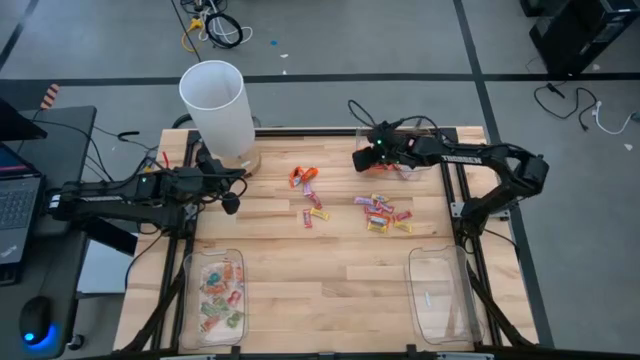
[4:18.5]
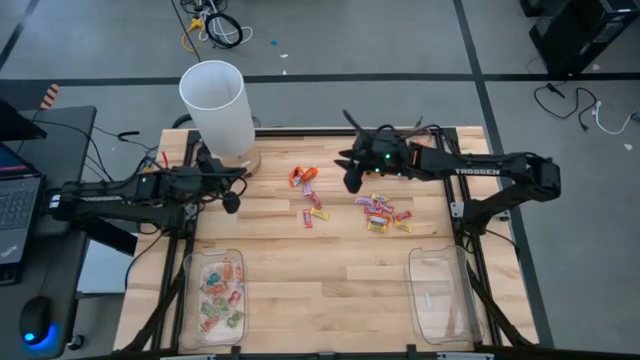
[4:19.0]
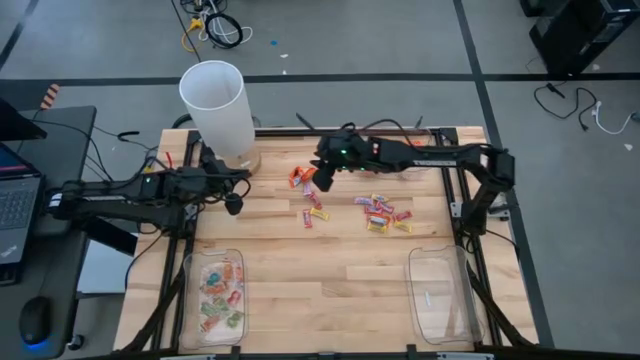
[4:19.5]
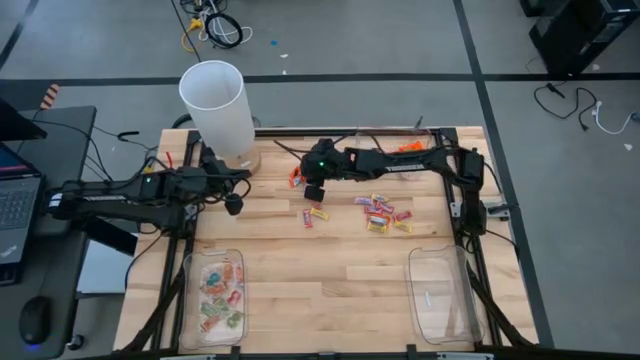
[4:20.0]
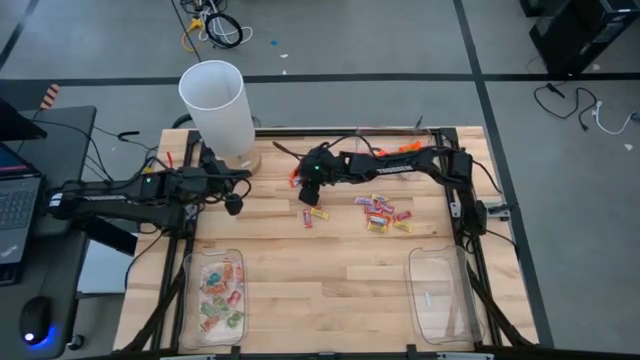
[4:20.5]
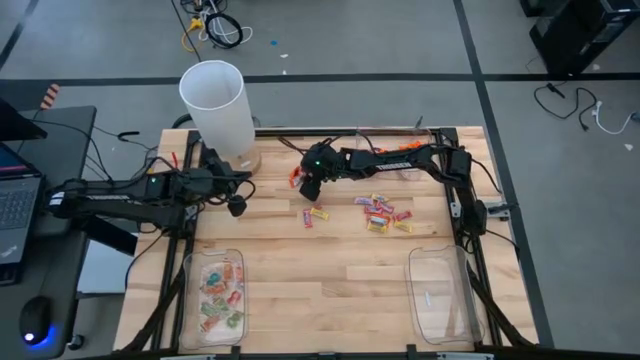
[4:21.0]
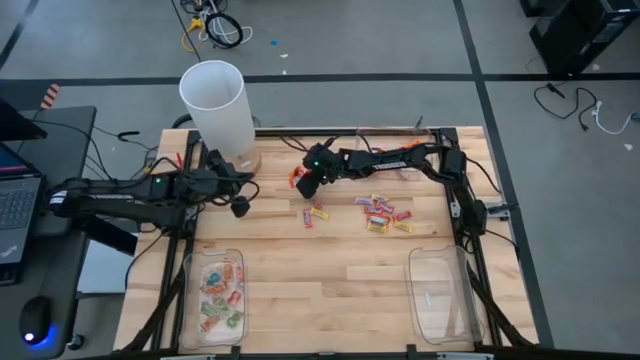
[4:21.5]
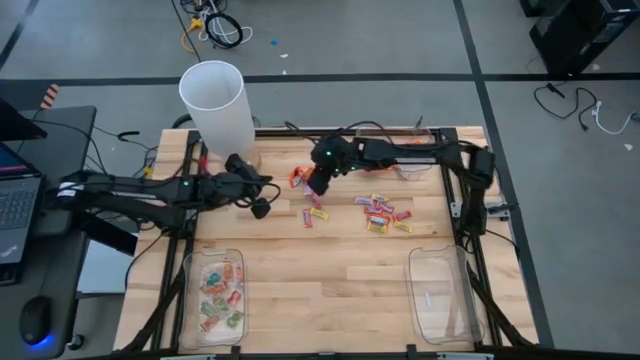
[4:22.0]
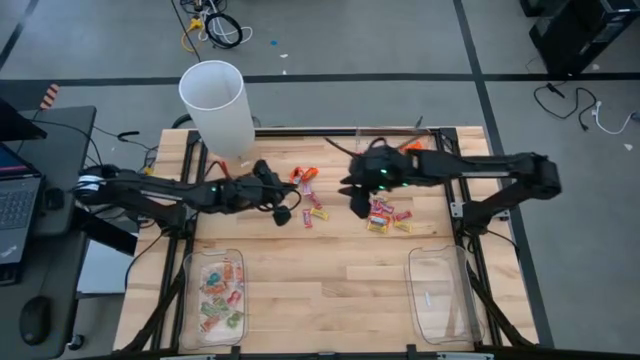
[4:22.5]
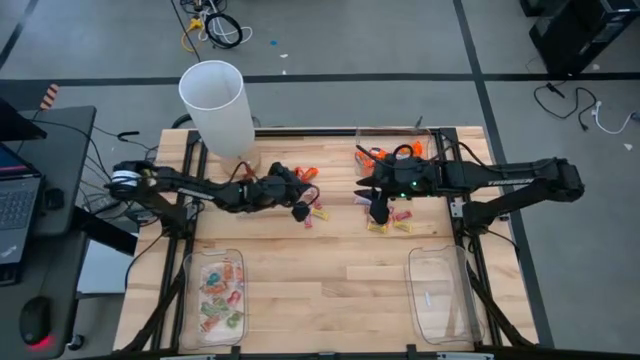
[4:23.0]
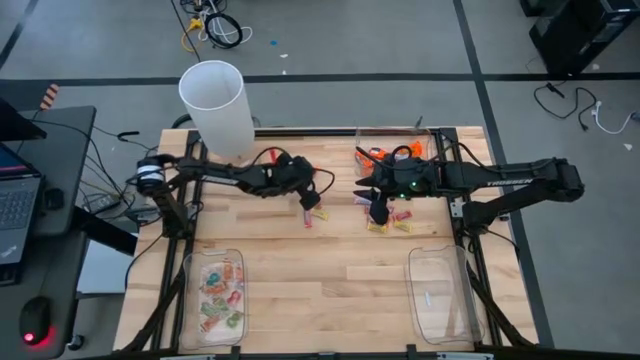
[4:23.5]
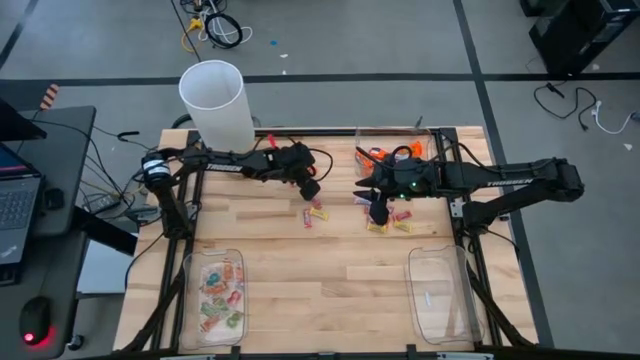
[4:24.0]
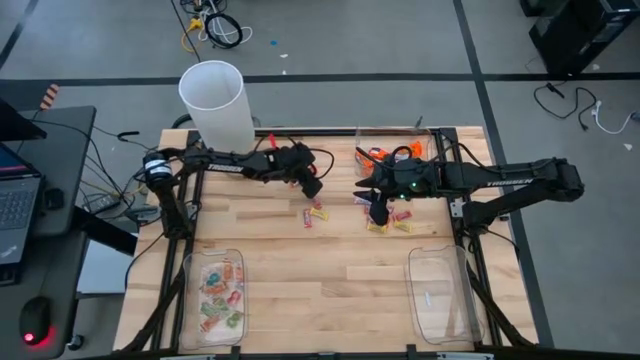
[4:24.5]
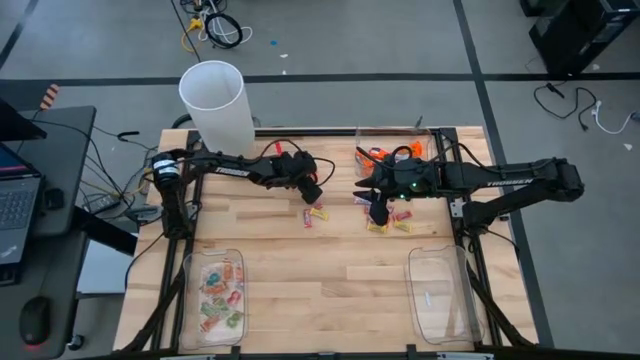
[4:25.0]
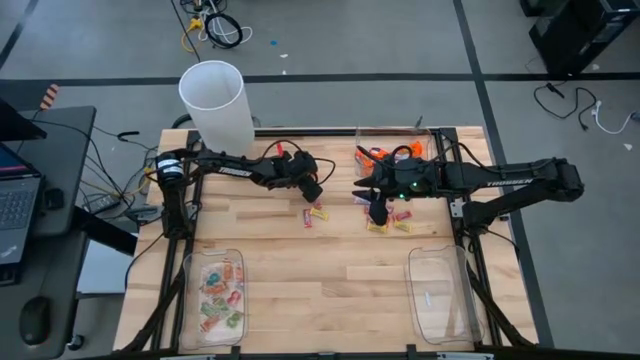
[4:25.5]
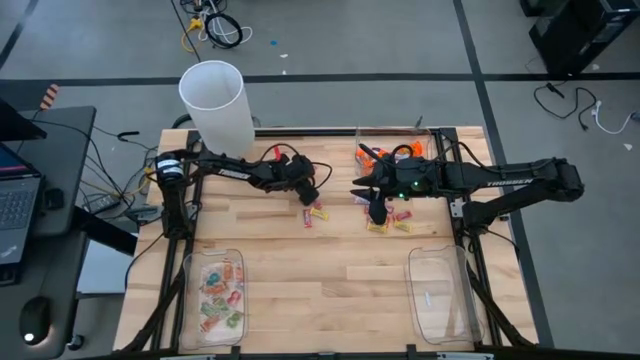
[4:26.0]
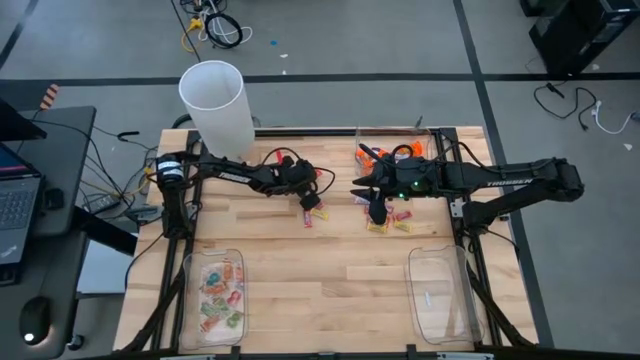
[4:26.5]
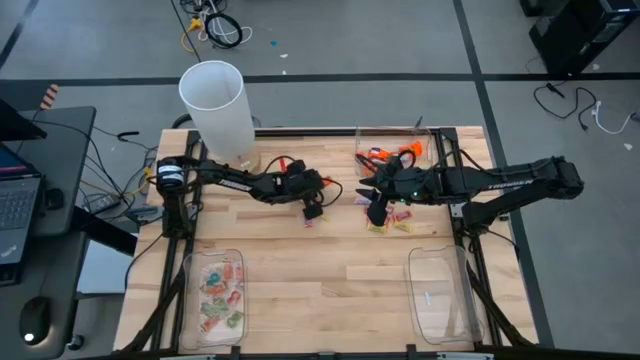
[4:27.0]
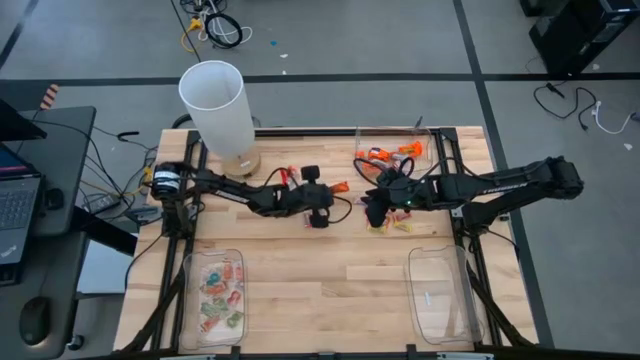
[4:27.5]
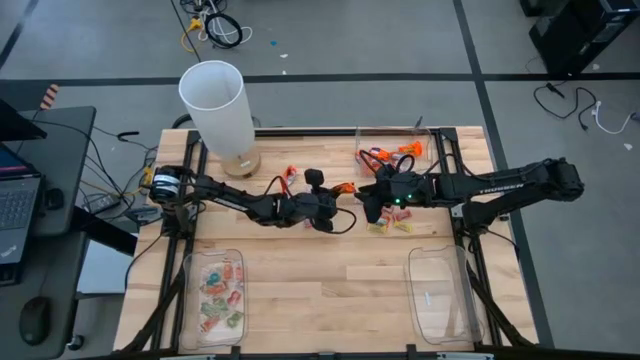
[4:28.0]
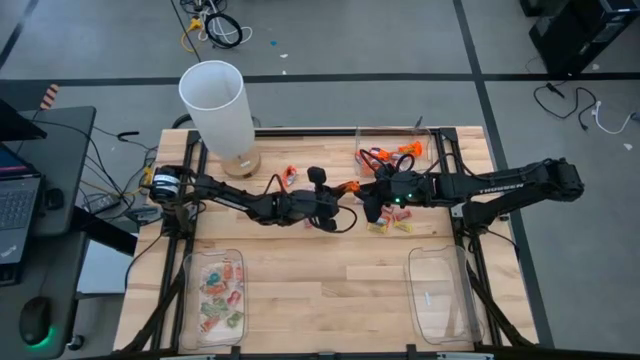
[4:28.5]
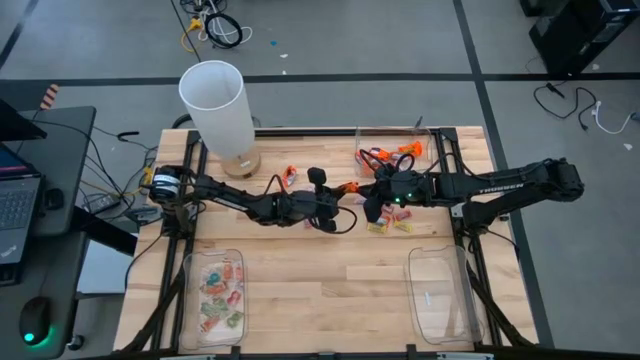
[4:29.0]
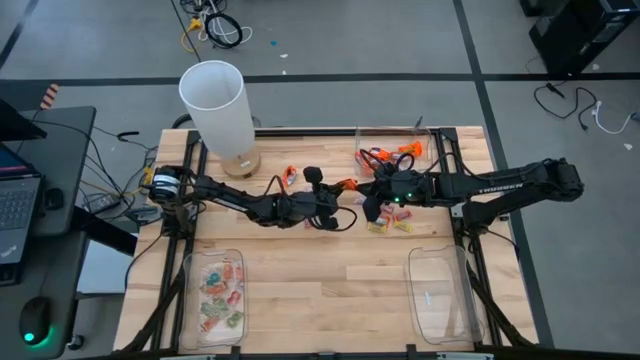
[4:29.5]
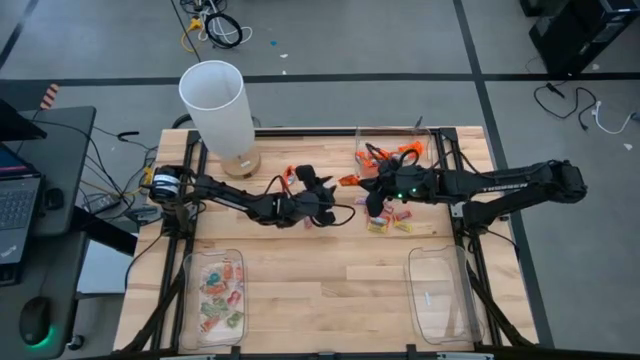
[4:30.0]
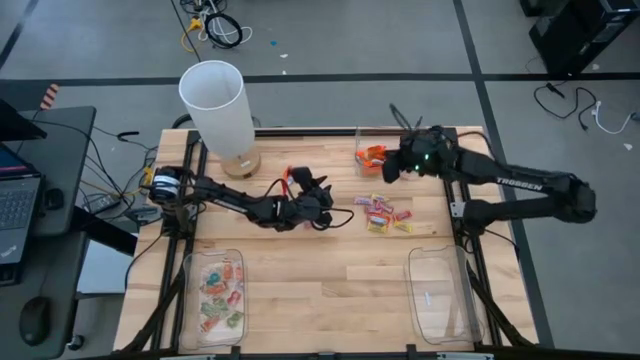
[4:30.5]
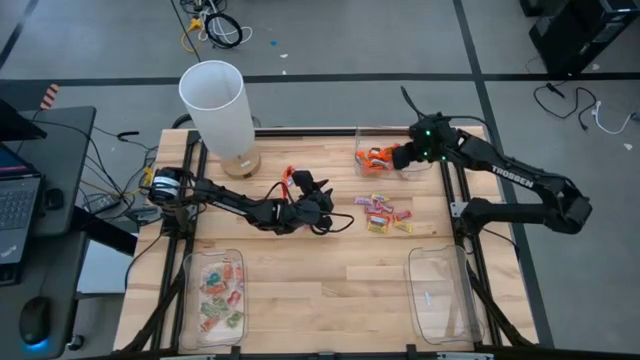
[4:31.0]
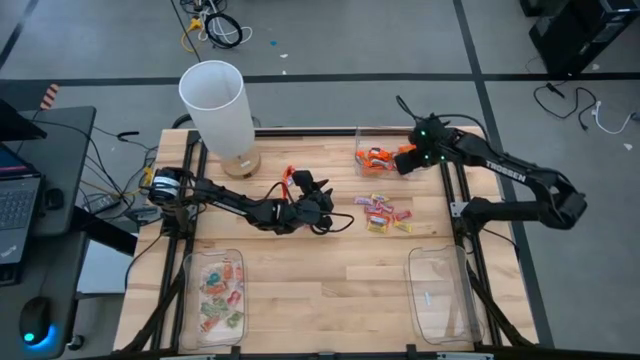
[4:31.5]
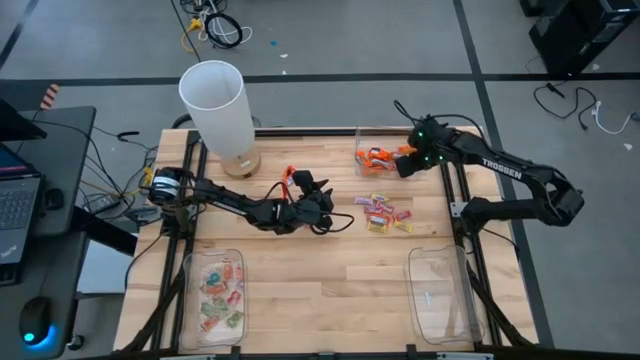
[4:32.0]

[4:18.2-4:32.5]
Task: Sort candy
Put the large orange chocolate bar into the top right transparent bin

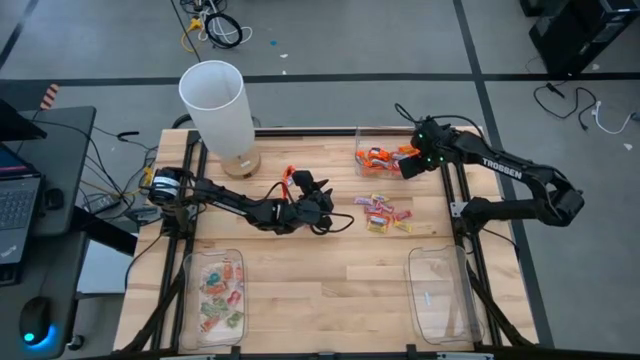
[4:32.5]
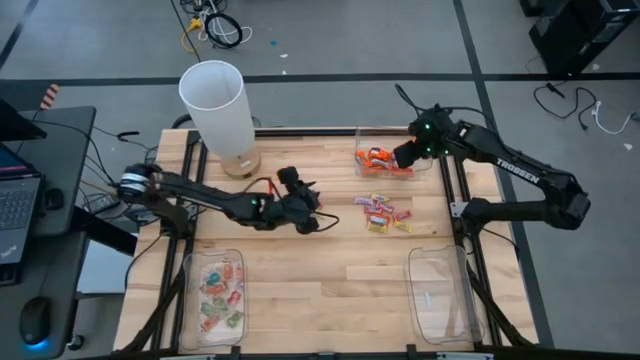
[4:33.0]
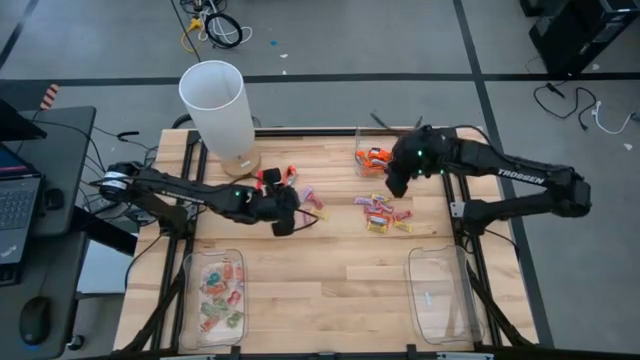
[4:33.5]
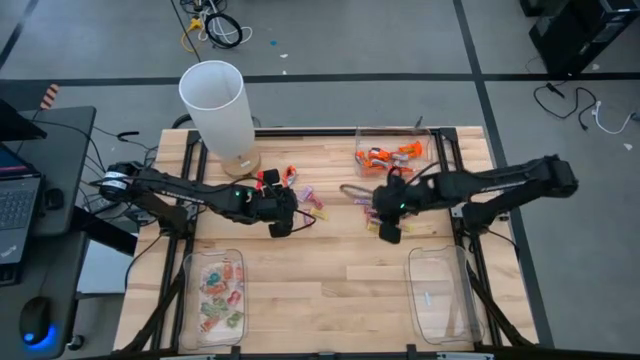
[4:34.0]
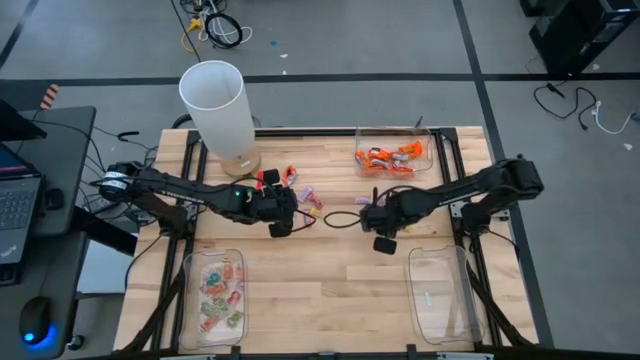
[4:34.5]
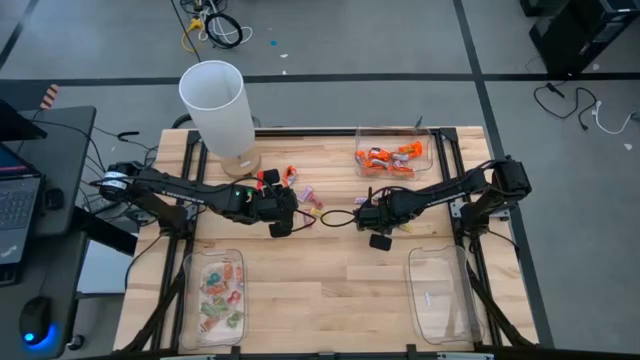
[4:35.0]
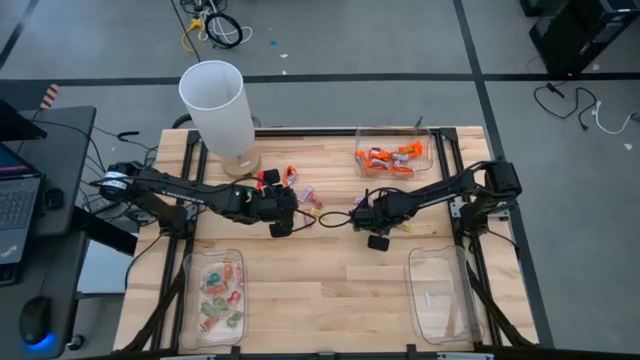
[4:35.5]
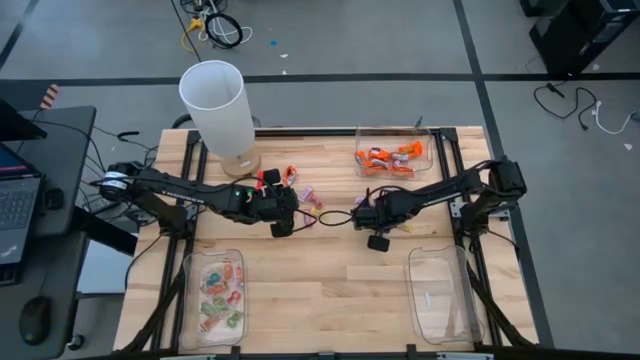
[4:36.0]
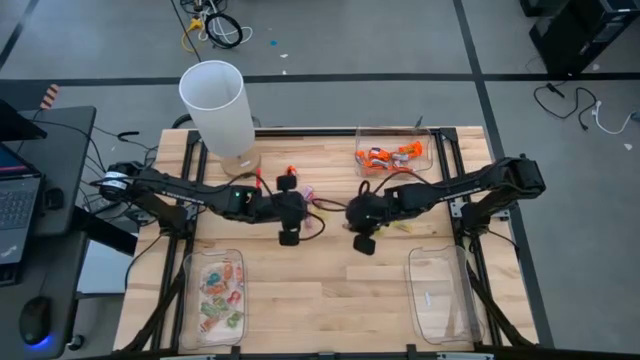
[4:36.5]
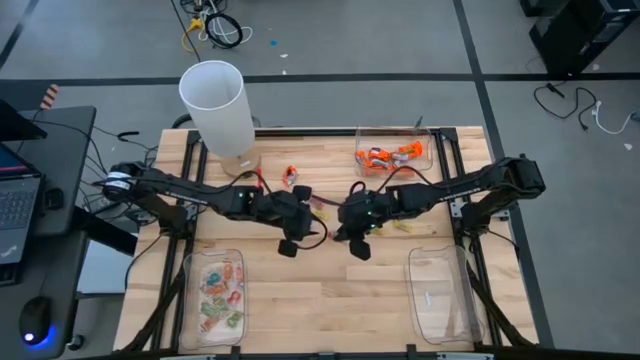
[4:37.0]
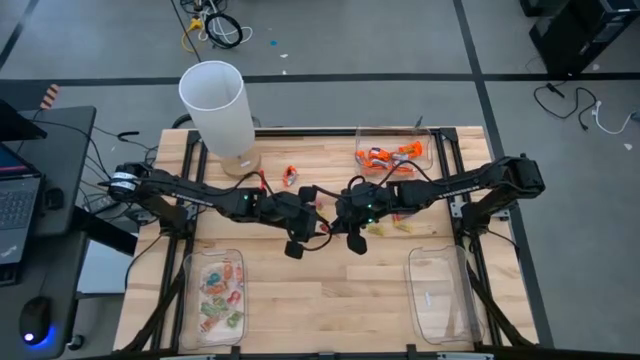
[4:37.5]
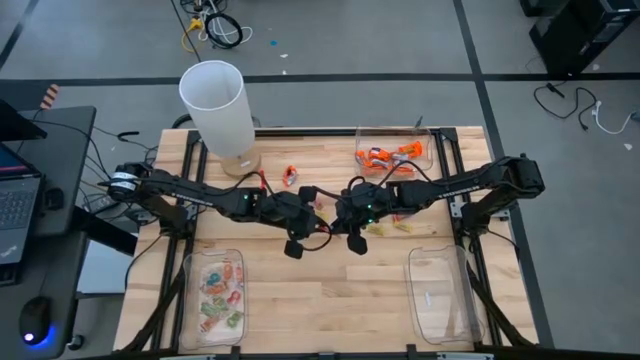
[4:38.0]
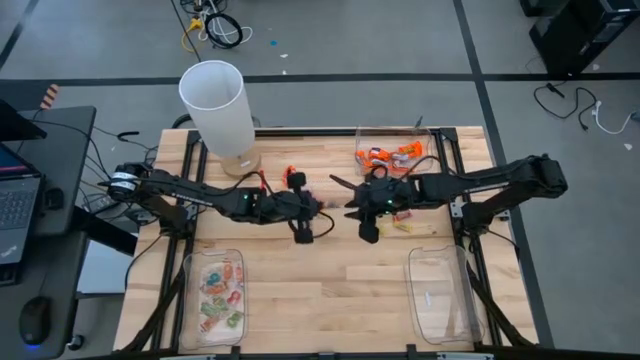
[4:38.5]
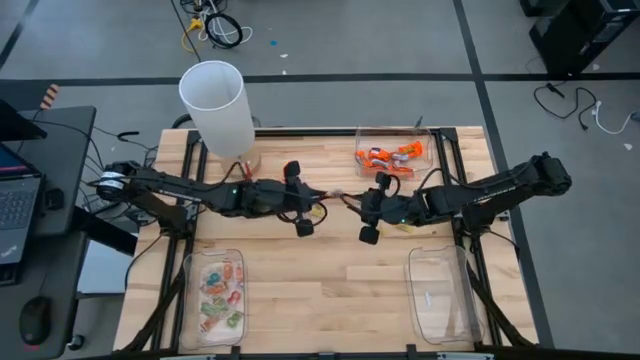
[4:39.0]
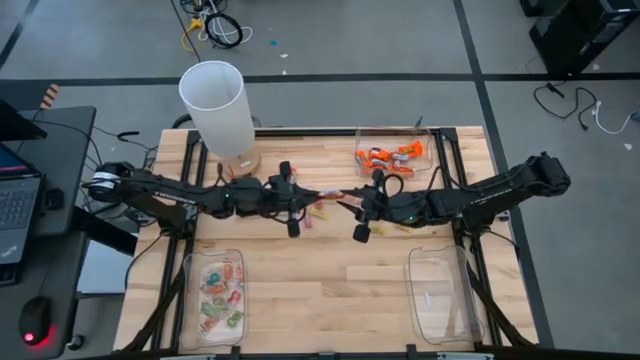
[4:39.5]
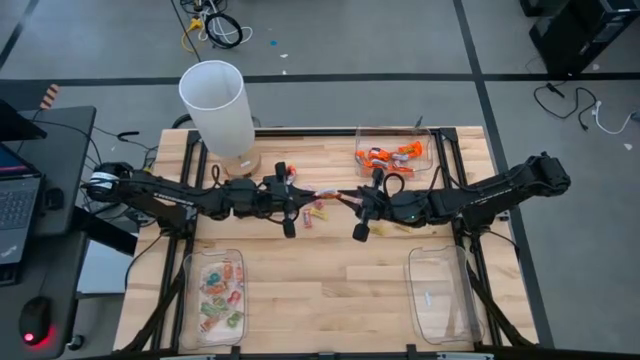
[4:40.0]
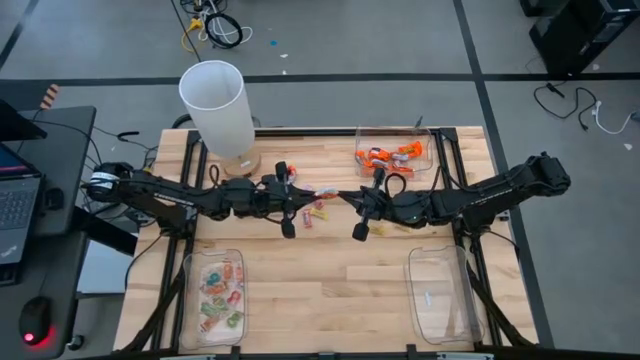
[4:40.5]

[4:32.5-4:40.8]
Put the large orange chocolate bar into the top right transparent bin
